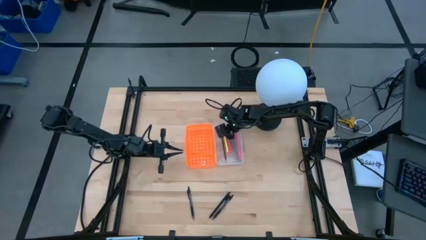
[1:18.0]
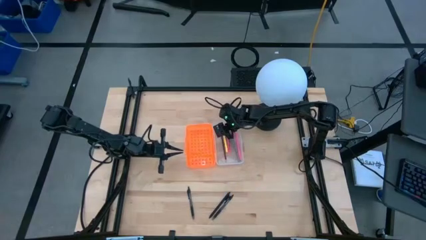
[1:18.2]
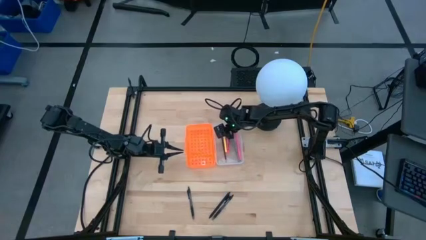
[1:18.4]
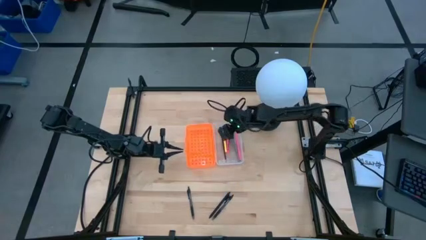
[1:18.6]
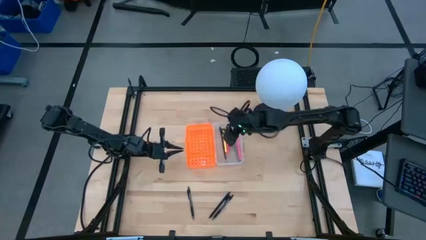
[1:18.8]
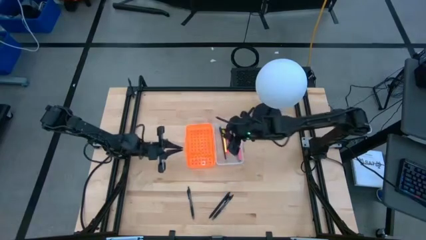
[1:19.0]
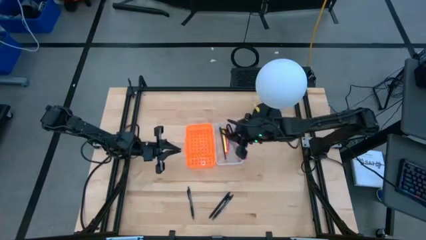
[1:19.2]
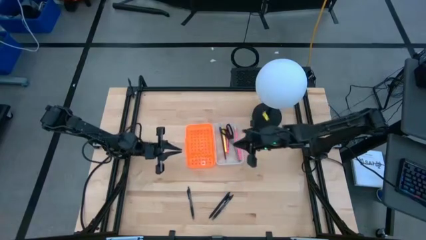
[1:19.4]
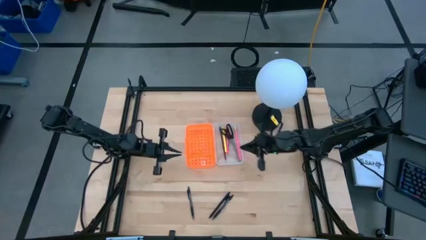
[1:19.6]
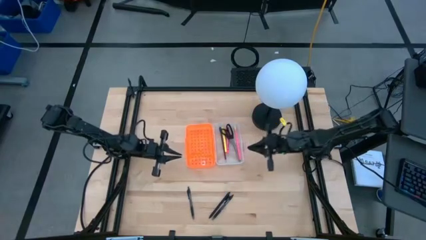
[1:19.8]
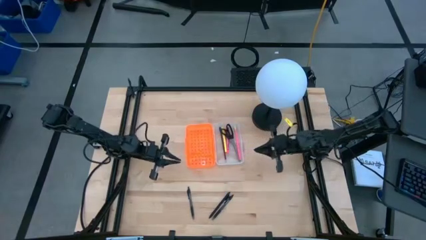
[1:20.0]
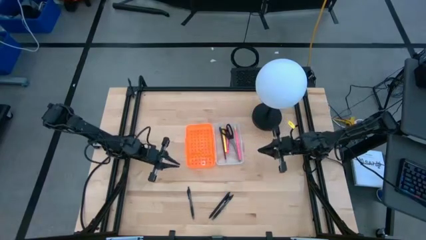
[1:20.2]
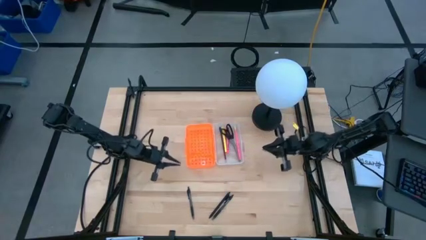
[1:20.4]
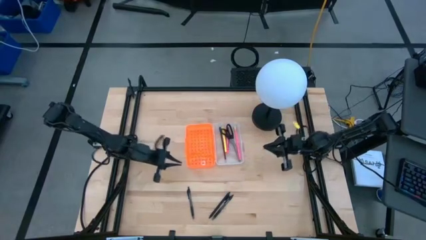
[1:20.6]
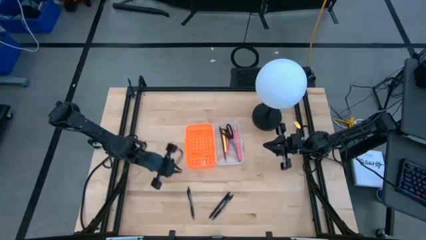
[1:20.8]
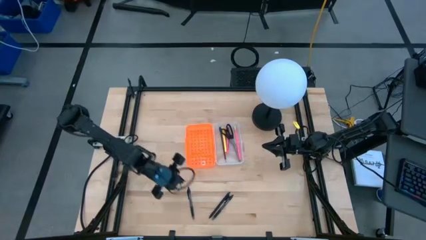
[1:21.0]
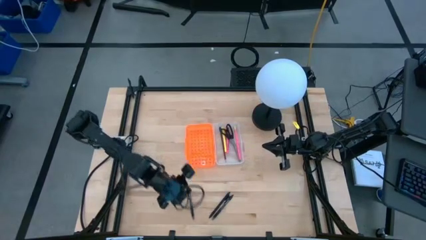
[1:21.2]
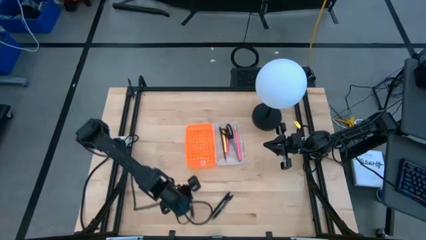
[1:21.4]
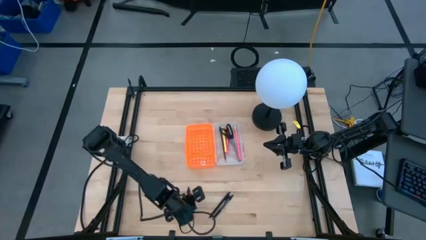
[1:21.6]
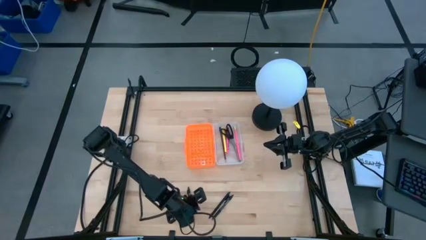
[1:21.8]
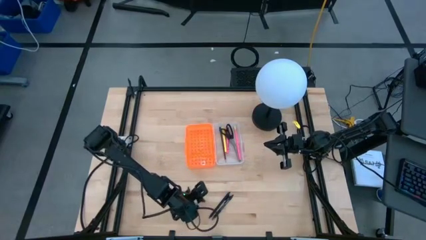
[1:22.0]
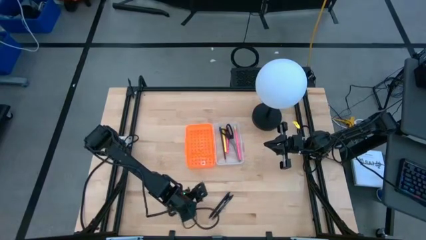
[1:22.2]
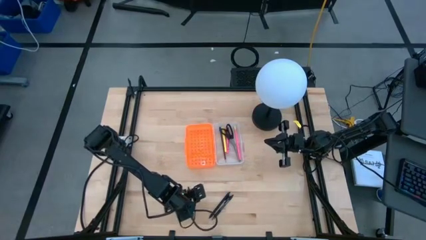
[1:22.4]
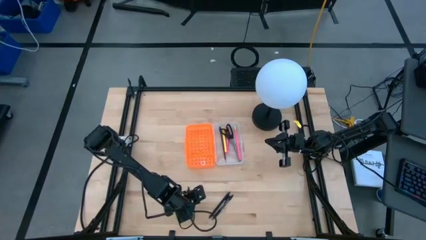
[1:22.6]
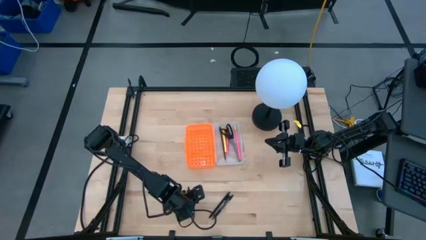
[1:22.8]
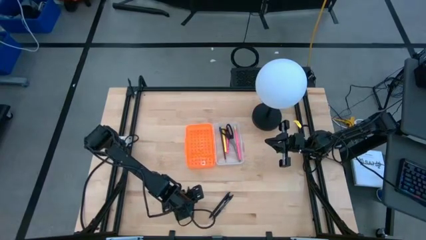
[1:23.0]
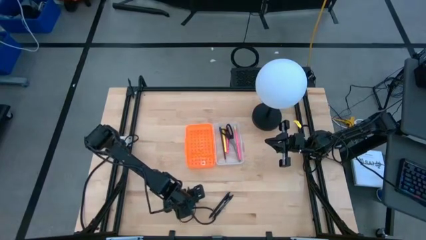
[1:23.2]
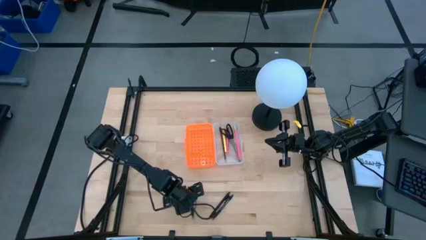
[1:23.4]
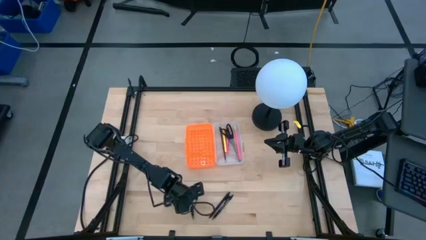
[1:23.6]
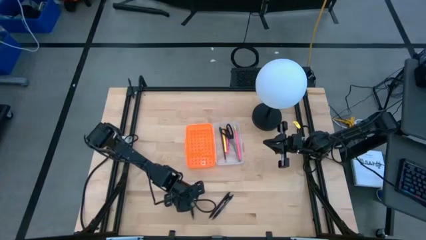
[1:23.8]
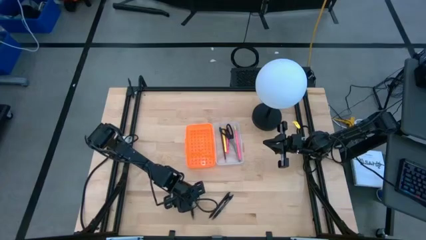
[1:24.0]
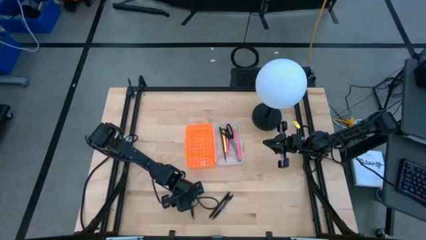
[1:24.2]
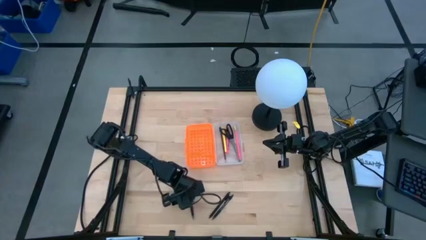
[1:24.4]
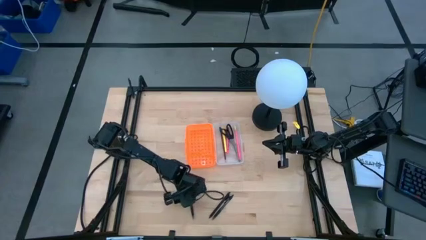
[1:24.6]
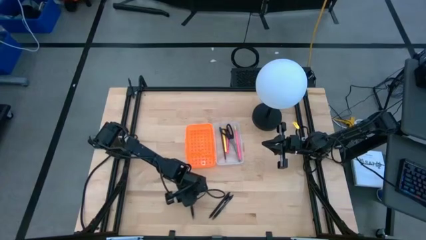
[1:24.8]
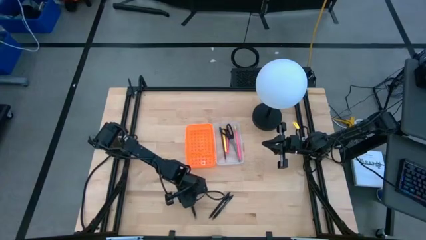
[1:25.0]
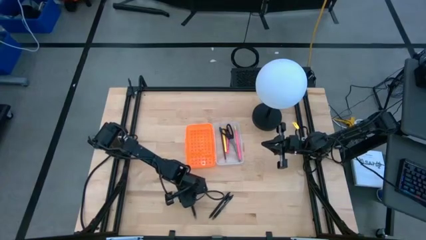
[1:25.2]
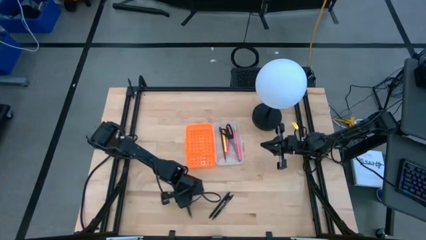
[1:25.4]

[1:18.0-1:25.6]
Task: Pick & place school supplies into a supply box
Put the left black pen into the orange supply box

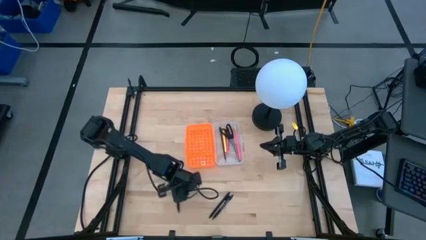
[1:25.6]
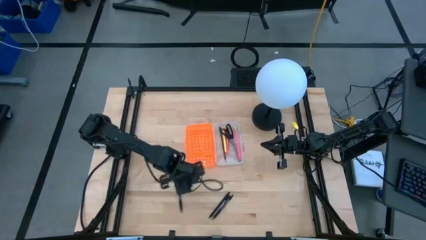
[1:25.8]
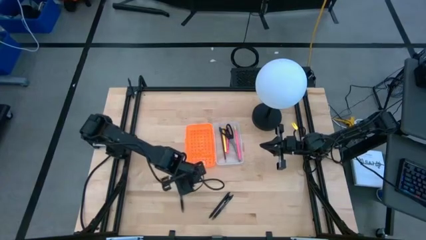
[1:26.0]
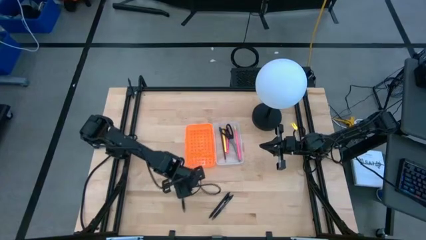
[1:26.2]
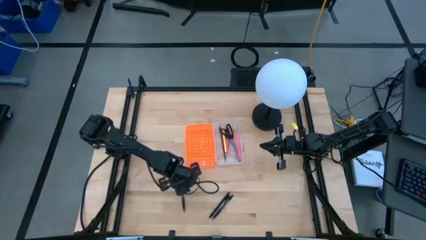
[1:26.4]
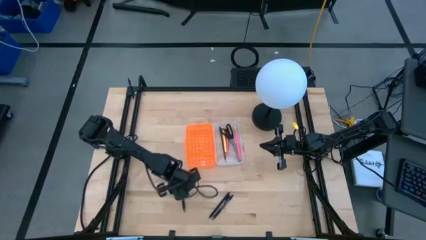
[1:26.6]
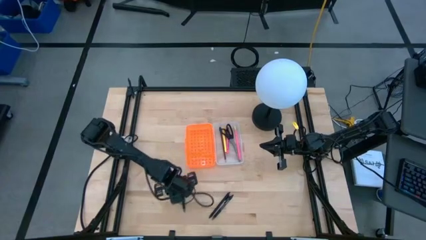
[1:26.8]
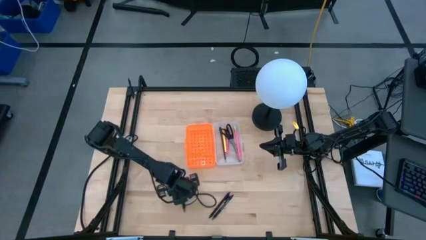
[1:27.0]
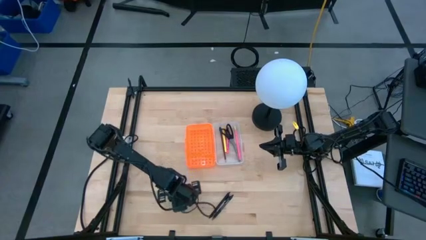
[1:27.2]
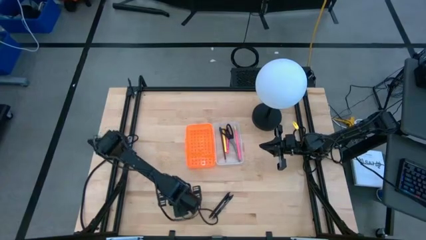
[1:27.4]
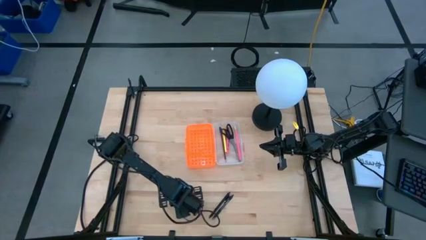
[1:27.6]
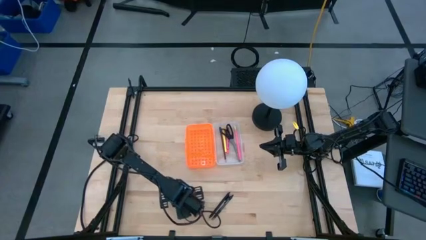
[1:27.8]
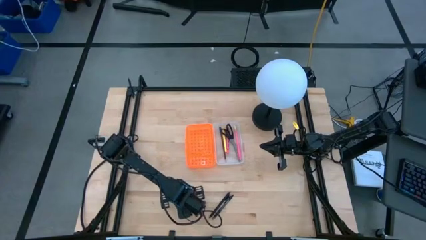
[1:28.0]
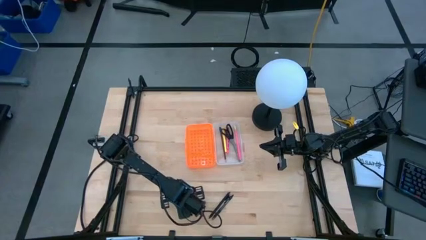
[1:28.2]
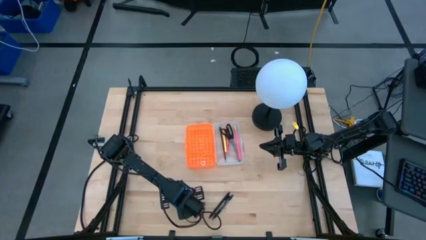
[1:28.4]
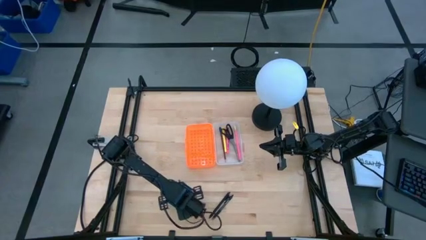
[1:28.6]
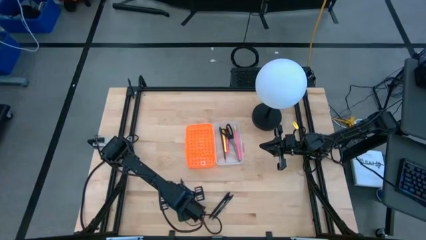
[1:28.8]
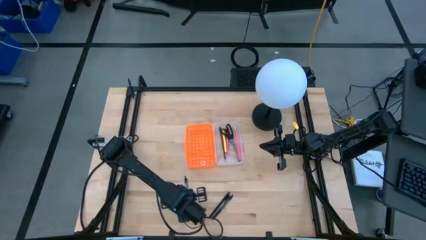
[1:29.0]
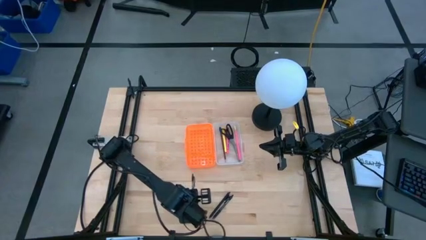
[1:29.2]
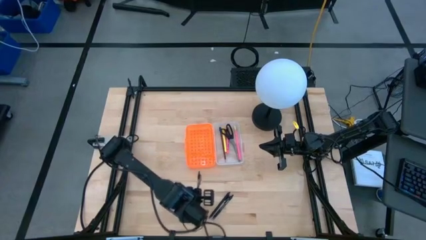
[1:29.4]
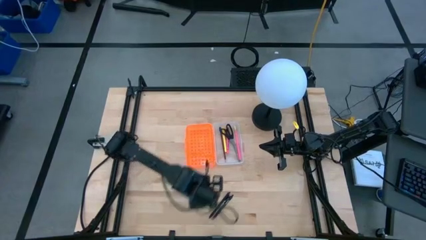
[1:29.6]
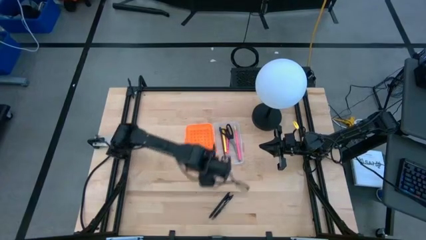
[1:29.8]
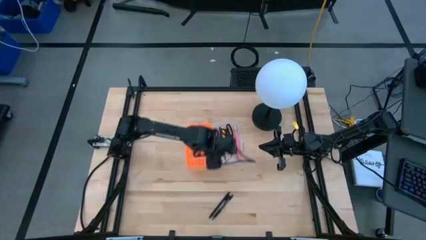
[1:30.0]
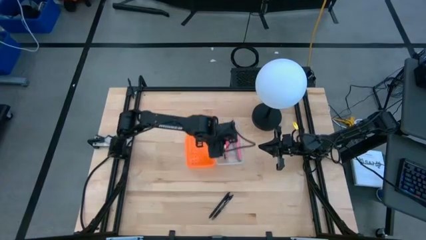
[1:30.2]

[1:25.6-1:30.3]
Put the left black pen into the orange supply box

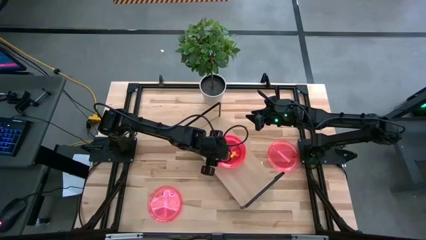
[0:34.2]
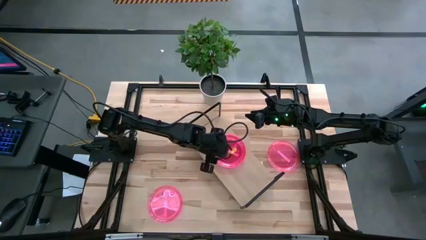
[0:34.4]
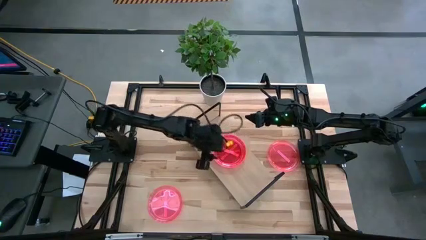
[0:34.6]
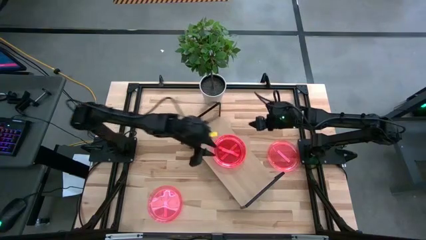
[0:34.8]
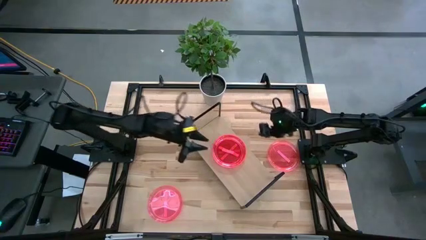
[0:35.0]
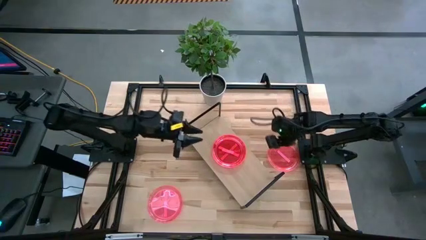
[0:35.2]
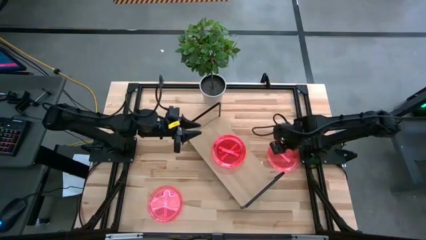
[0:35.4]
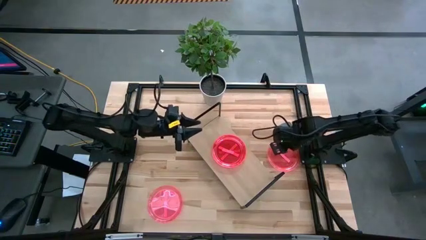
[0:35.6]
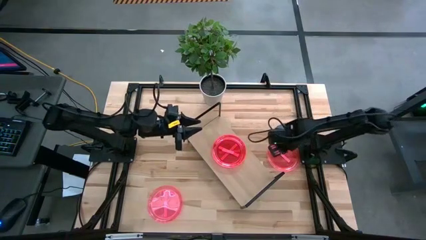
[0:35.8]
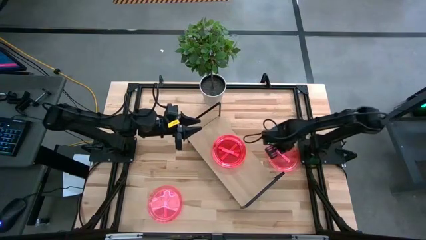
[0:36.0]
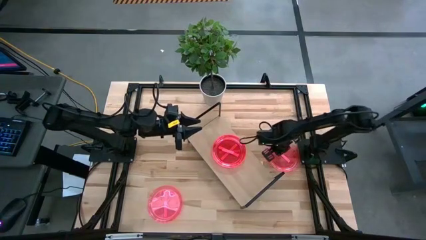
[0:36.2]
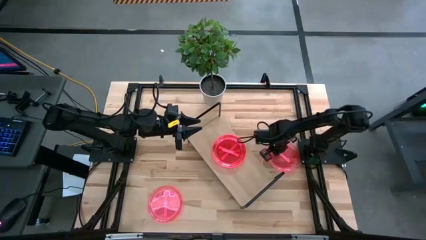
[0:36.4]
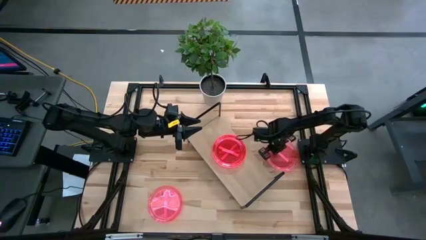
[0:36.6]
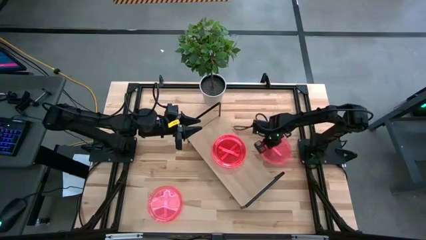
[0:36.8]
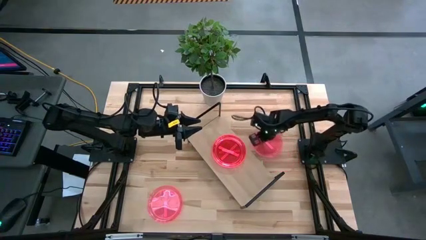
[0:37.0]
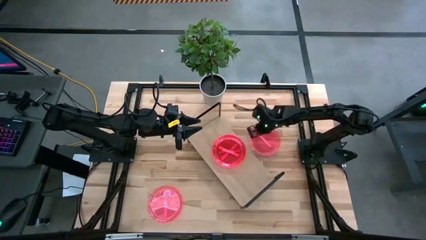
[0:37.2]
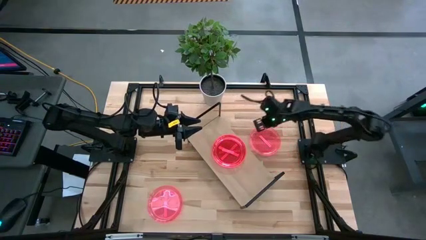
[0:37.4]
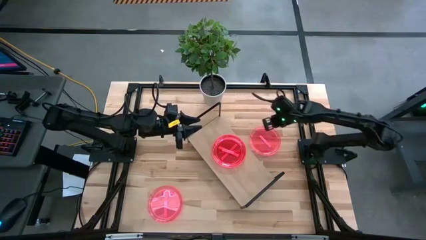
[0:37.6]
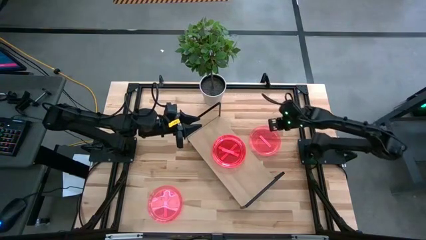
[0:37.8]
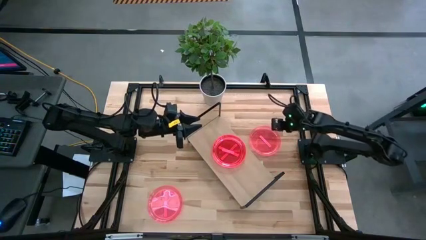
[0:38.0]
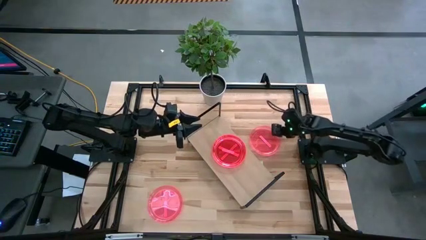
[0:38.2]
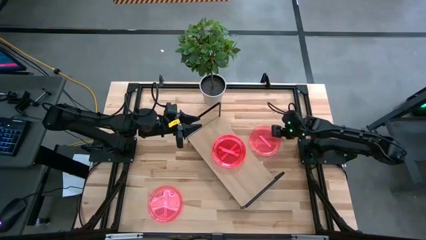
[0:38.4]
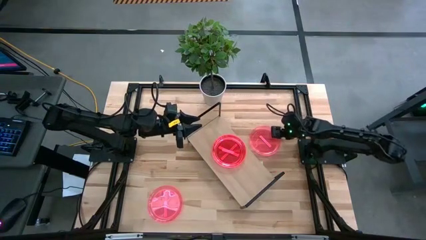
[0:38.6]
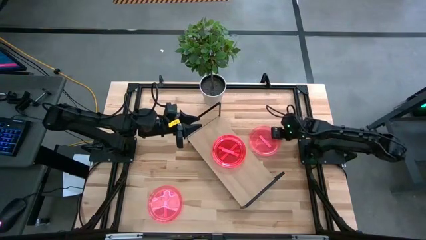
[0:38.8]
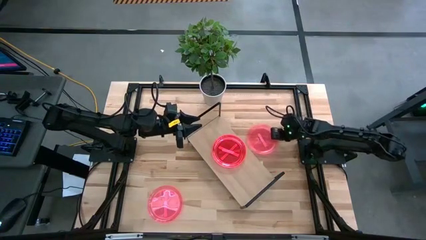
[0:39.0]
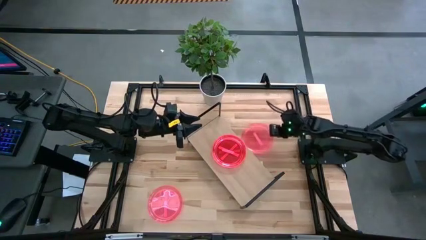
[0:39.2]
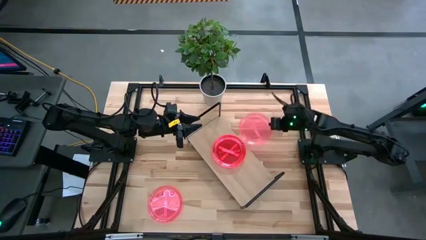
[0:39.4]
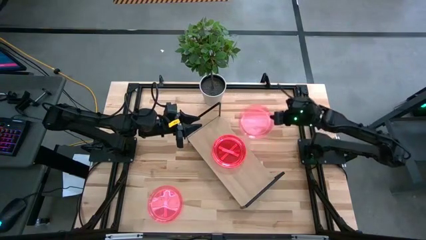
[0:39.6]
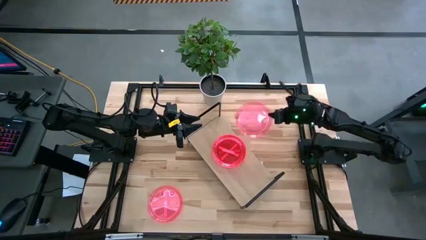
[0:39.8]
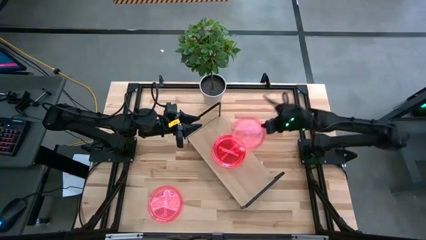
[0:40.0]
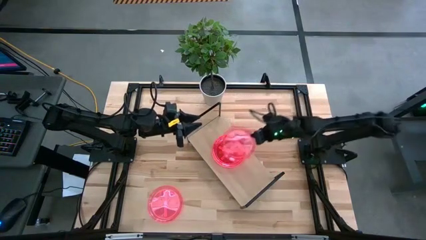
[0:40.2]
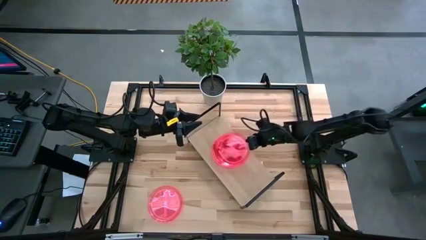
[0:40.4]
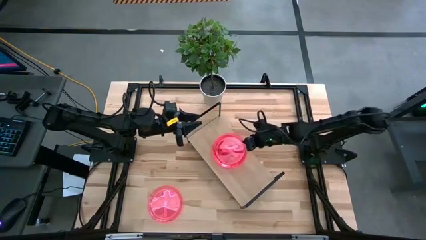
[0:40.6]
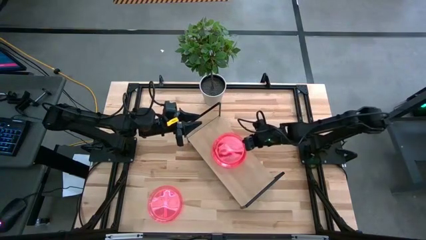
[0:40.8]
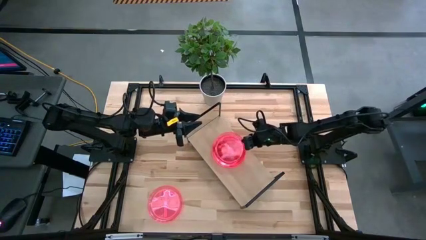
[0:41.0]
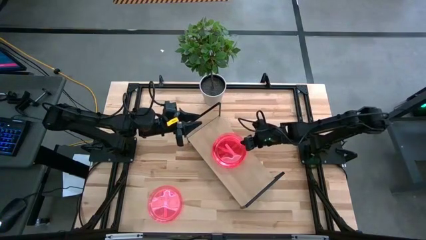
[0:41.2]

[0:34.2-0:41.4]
Task: Place and stack plates onto a shelf
Stack the pink plate on top of the other pink plate on the shelf
